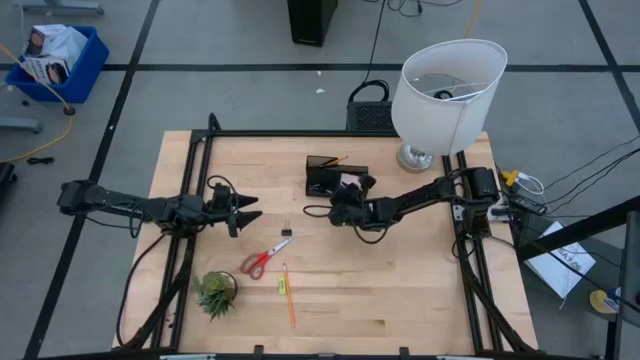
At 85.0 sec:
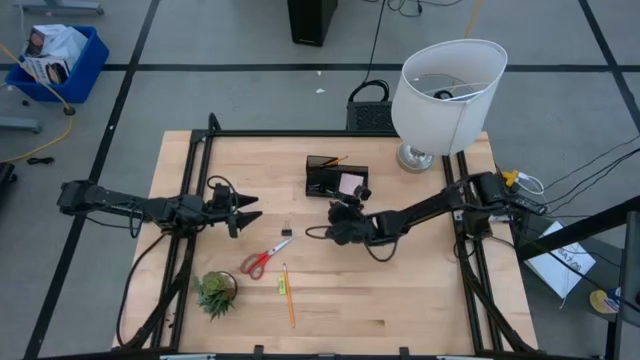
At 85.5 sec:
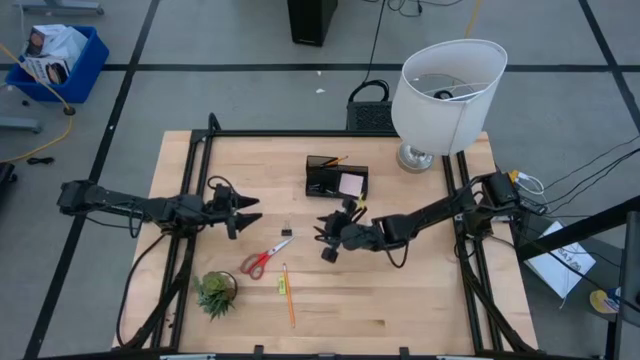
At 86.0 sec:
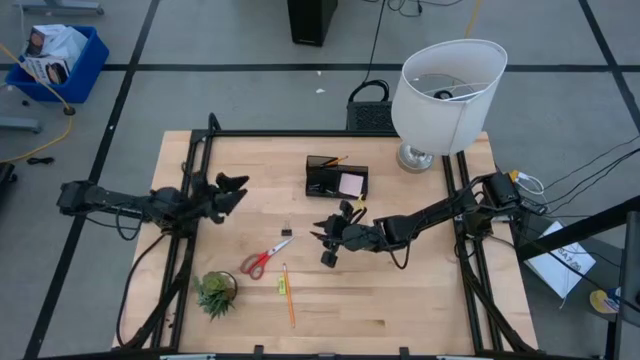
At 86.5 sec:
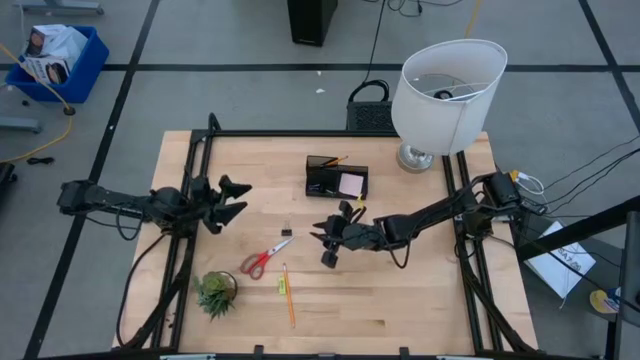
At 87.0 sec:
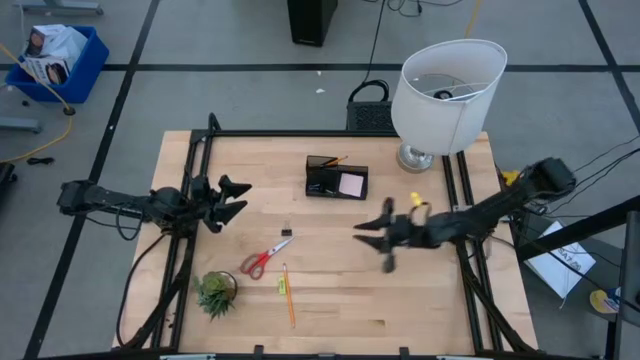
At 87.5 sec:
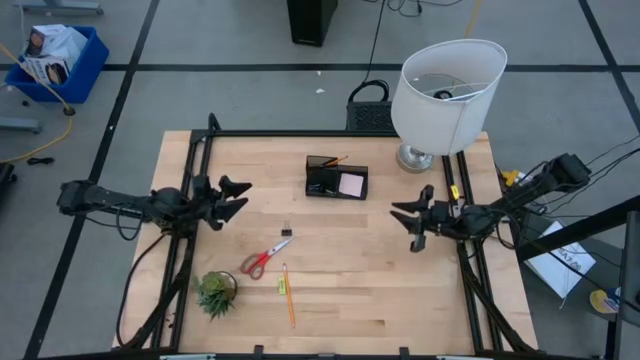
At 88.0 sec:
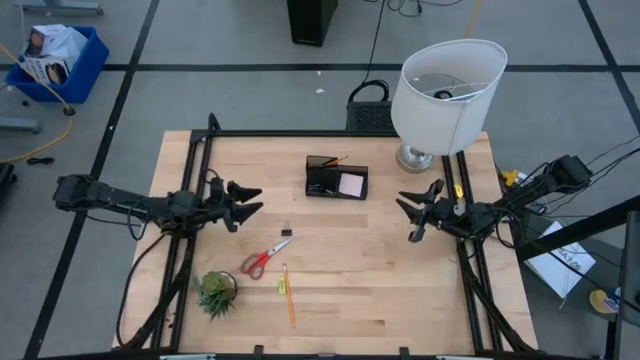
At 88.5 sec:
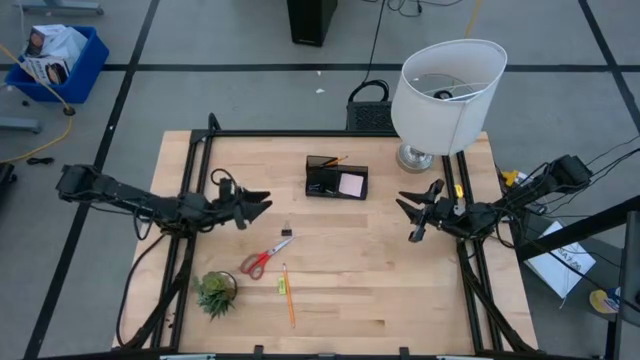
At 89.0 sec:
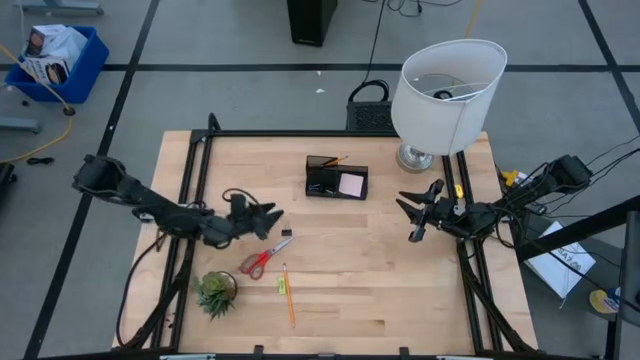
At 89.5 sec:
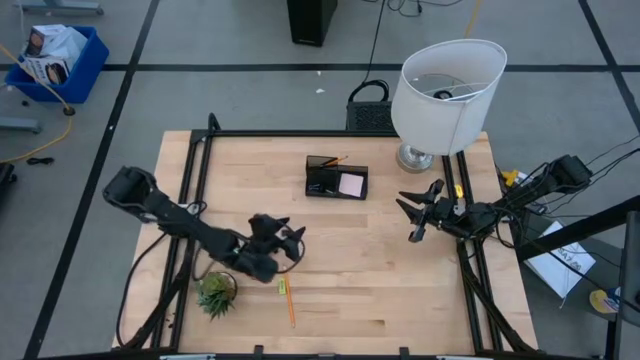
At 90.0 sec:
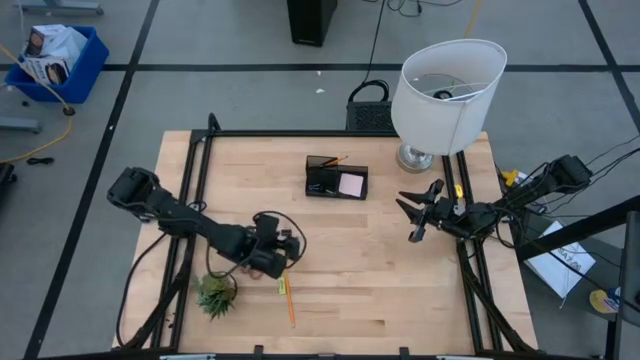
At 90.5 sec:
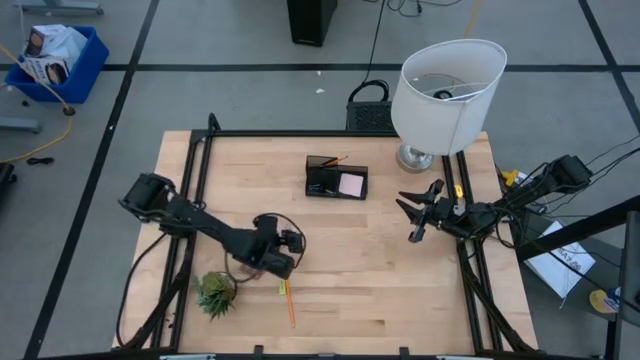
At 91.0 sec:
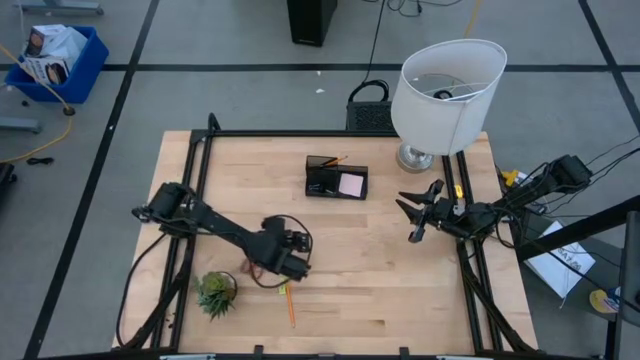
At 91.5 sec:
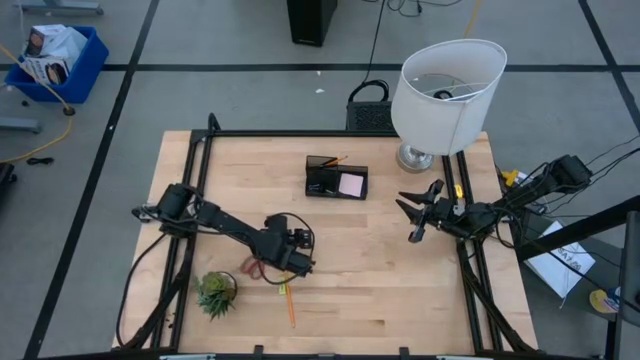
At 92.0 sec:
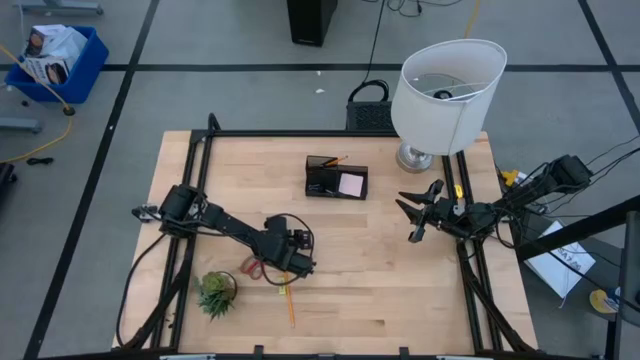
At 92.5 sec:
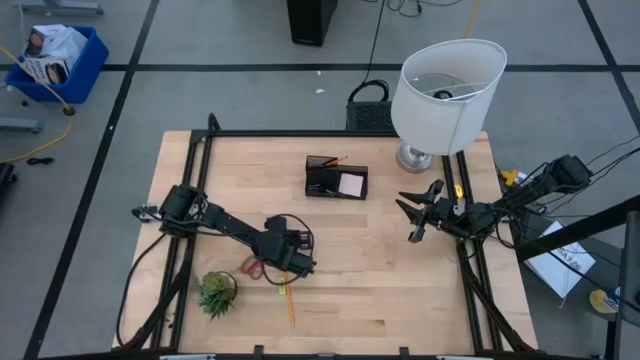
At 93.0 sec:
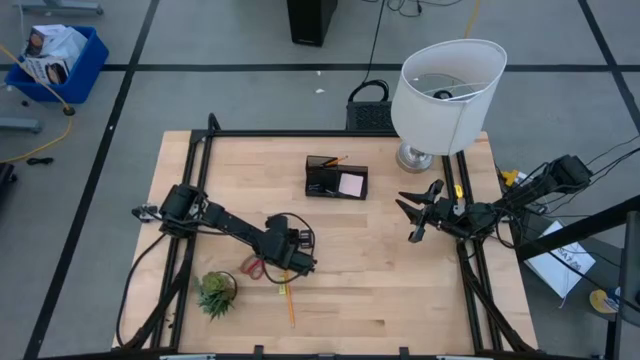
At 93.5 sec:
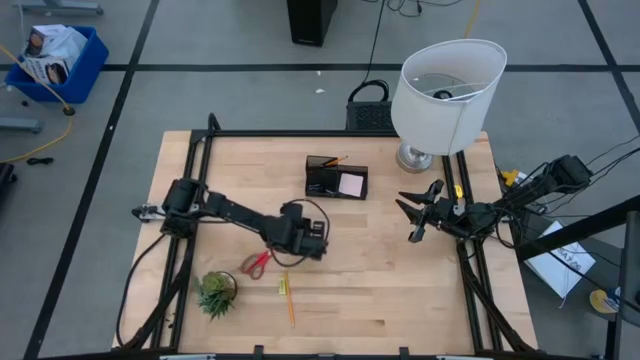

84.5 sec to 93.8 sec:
Task: Pick and place office supplies into organizer
Put the black paper clip into the desk organizer

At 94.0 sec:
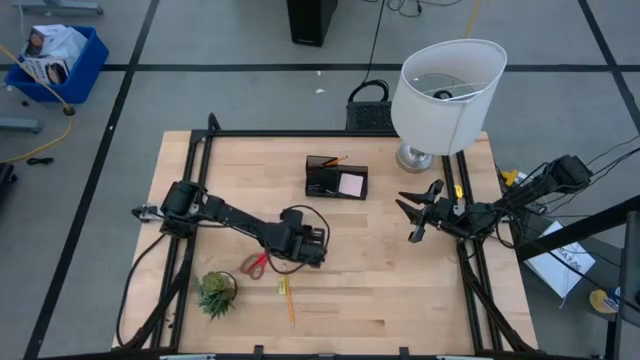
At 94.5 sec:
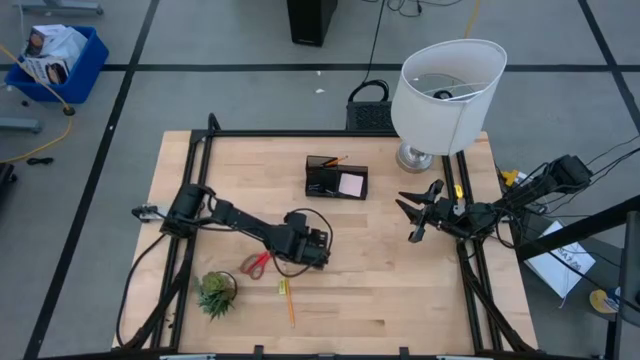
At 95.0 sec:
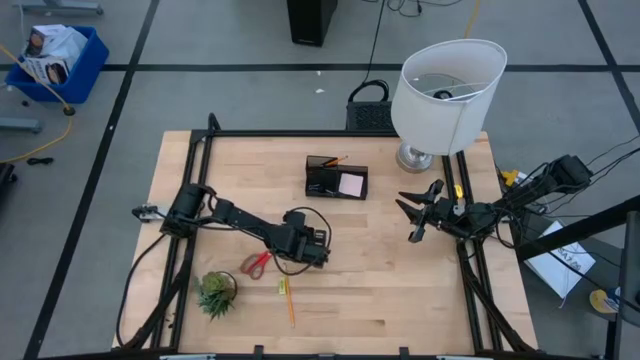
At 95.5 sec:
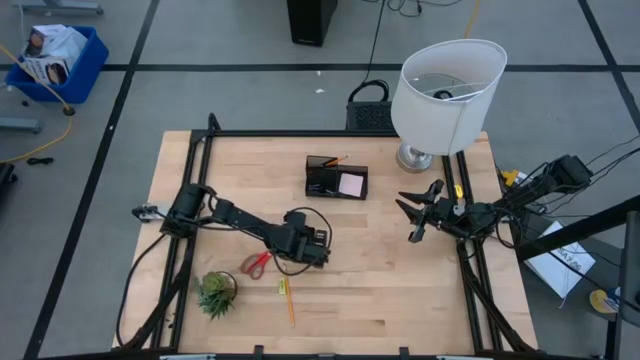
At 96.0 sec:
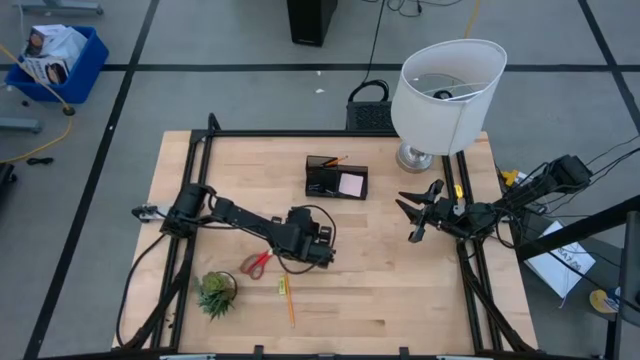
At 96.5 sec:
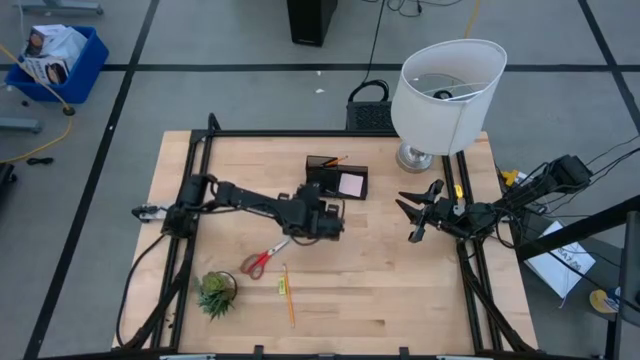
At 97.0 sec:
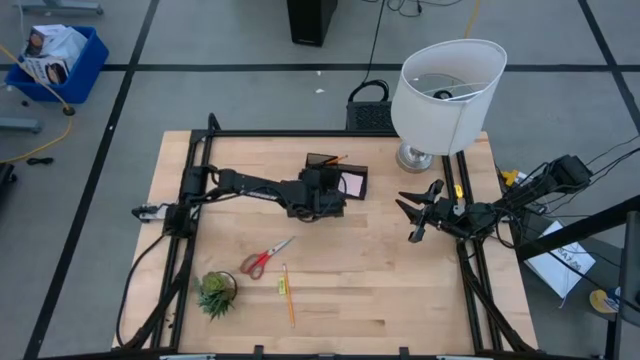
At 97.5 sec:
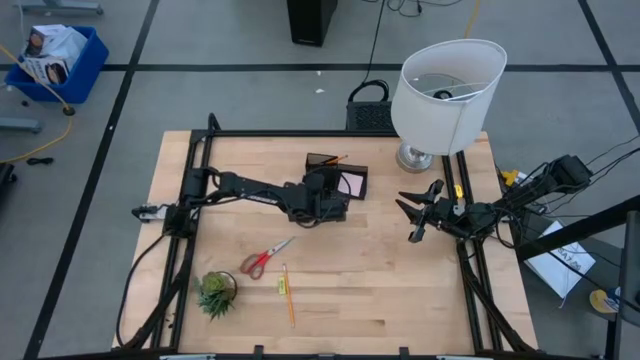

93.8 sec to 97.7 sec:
Put the black paper clip into the desk organizer
